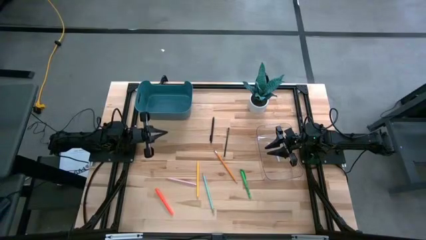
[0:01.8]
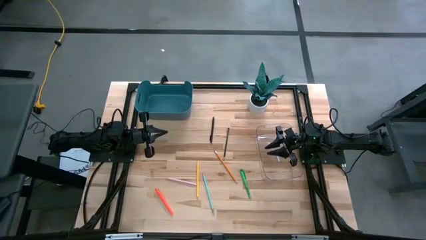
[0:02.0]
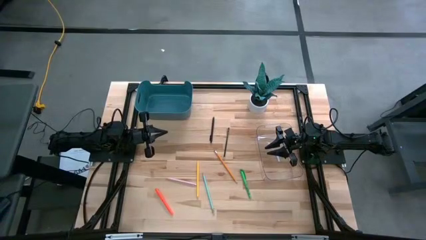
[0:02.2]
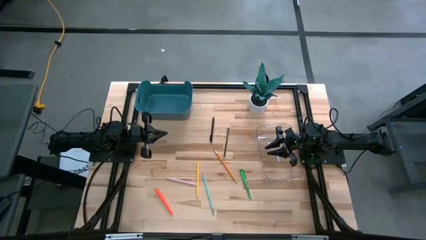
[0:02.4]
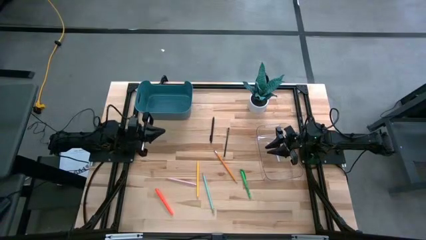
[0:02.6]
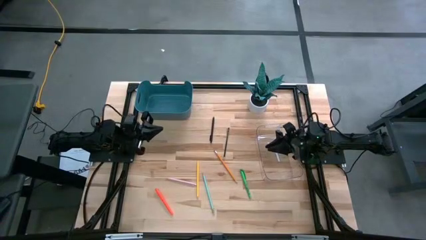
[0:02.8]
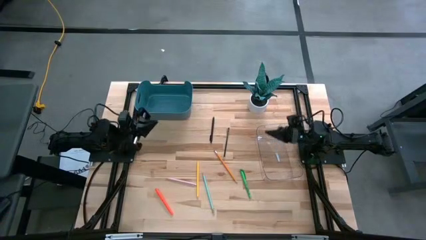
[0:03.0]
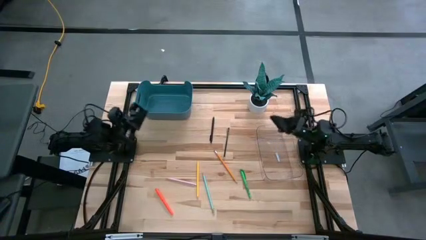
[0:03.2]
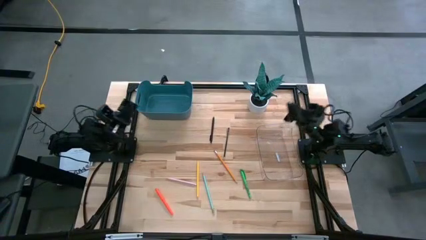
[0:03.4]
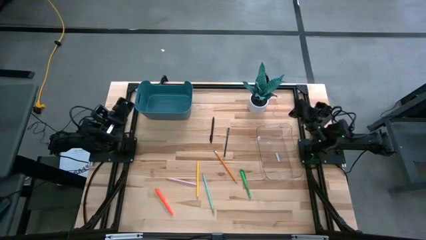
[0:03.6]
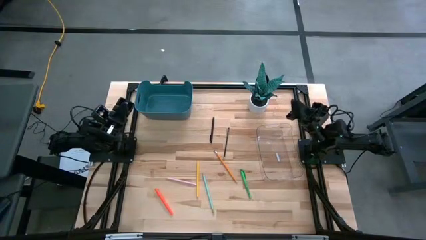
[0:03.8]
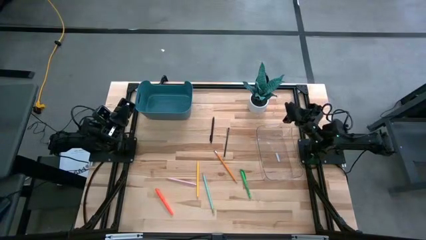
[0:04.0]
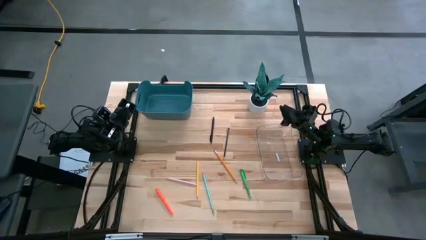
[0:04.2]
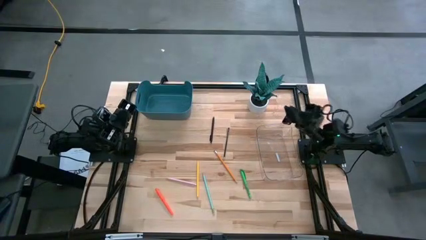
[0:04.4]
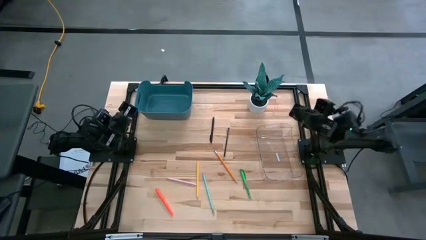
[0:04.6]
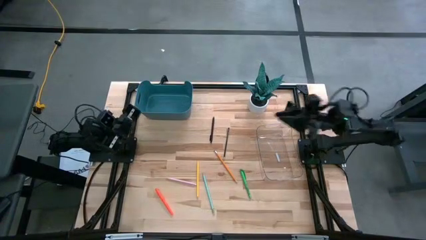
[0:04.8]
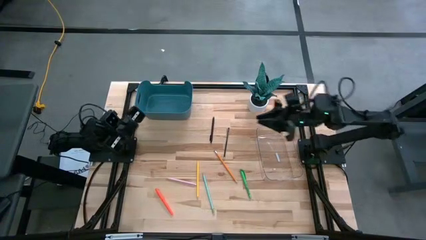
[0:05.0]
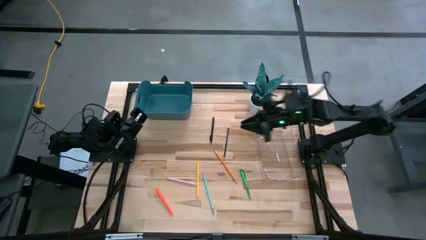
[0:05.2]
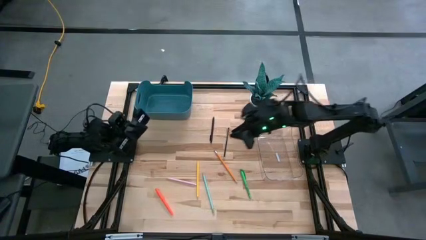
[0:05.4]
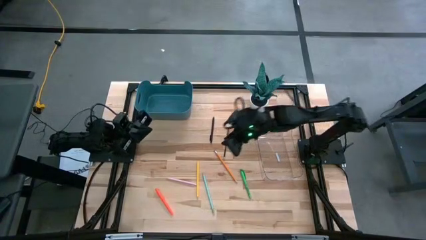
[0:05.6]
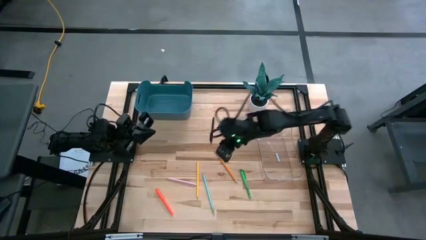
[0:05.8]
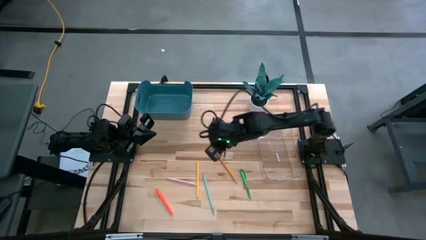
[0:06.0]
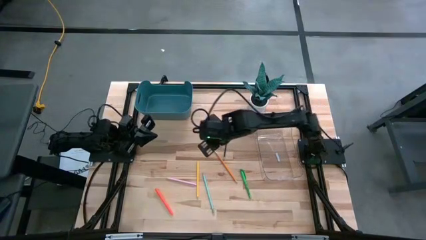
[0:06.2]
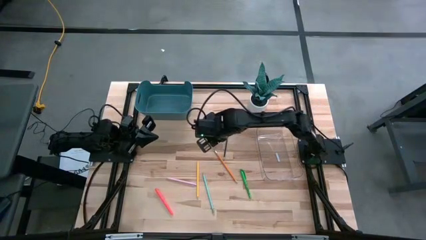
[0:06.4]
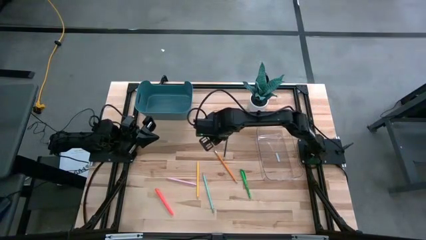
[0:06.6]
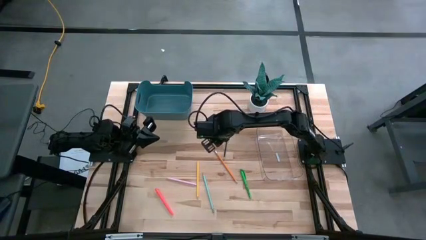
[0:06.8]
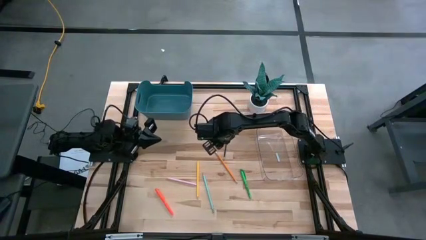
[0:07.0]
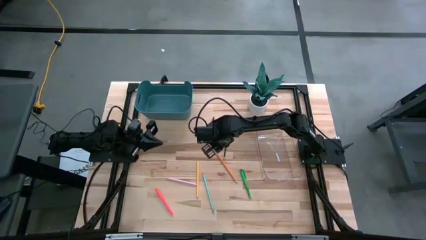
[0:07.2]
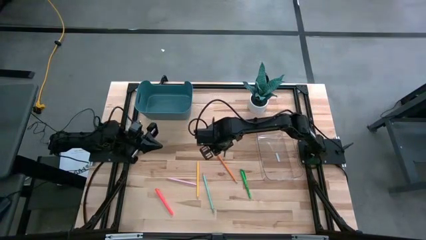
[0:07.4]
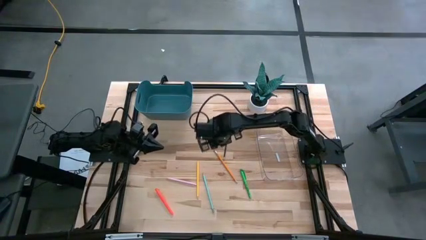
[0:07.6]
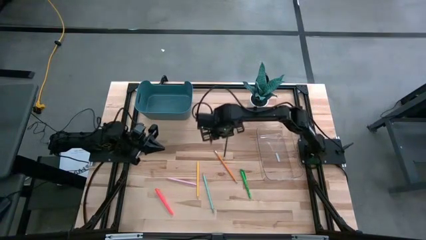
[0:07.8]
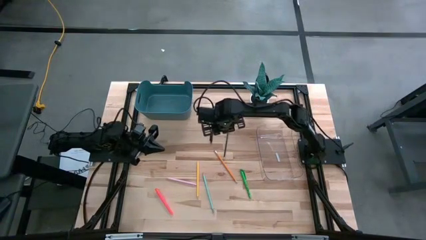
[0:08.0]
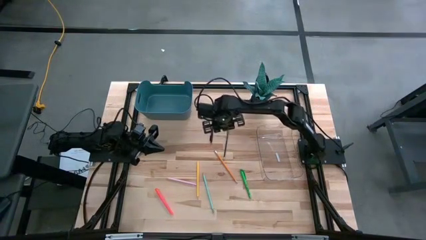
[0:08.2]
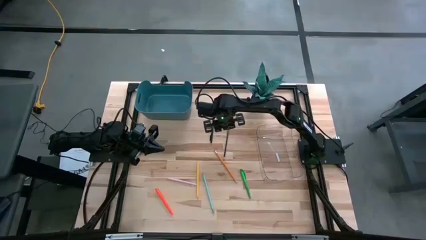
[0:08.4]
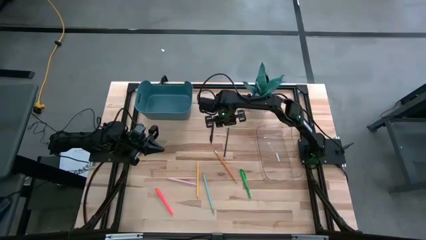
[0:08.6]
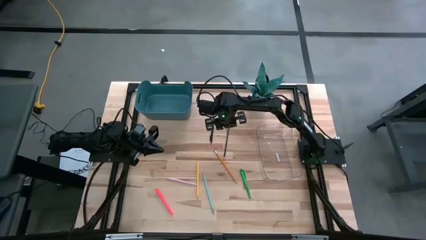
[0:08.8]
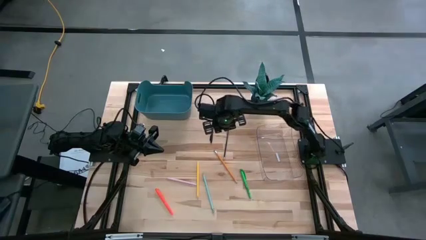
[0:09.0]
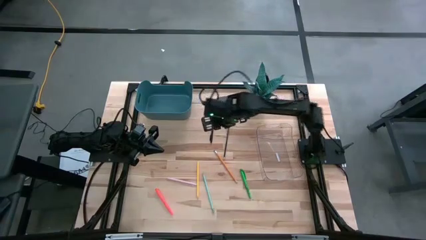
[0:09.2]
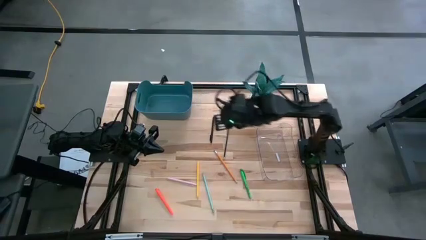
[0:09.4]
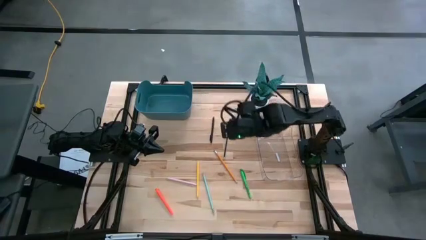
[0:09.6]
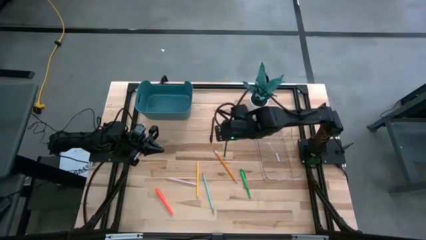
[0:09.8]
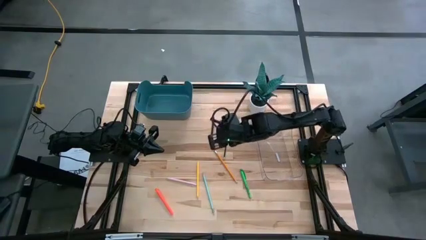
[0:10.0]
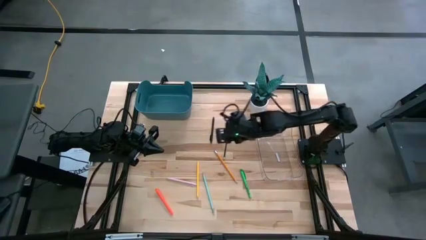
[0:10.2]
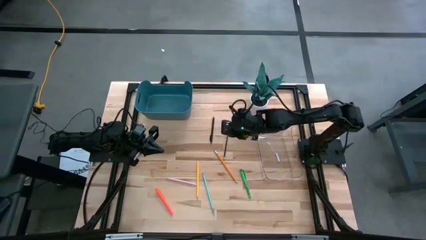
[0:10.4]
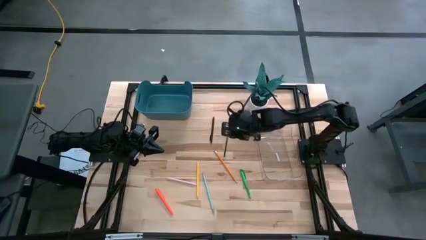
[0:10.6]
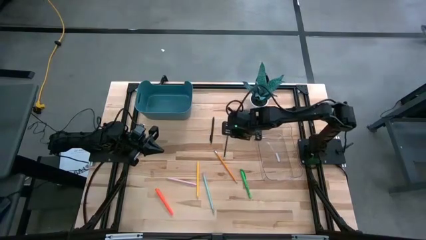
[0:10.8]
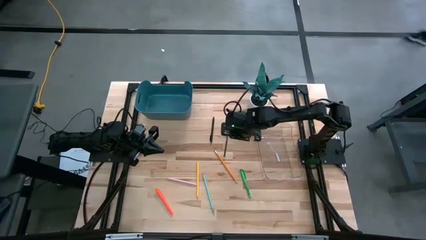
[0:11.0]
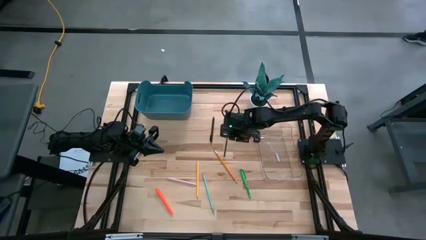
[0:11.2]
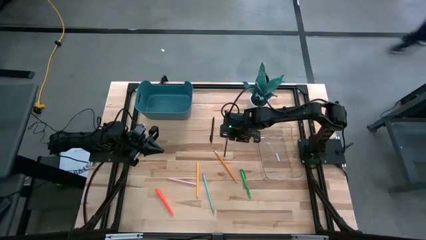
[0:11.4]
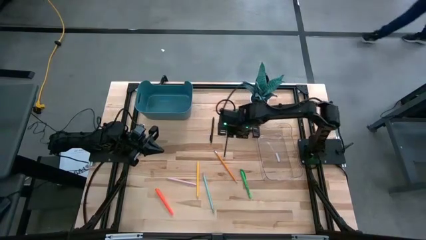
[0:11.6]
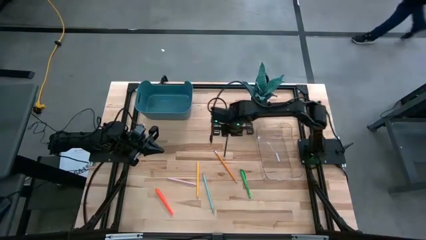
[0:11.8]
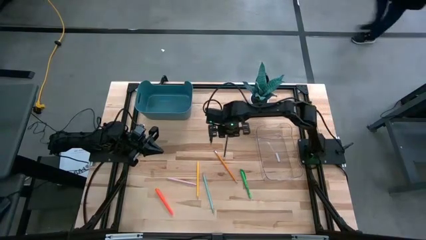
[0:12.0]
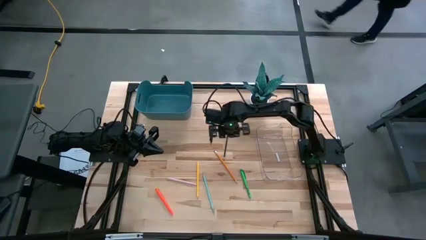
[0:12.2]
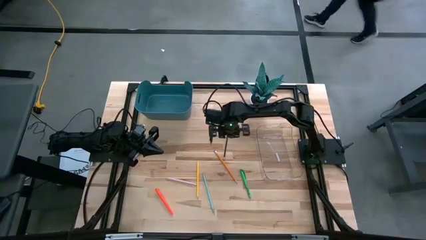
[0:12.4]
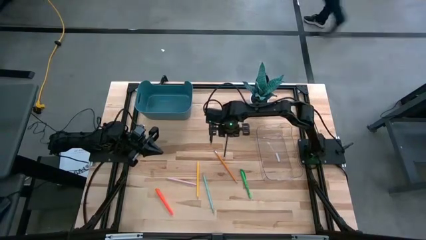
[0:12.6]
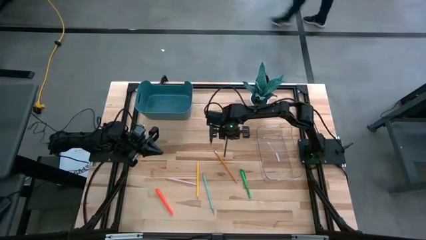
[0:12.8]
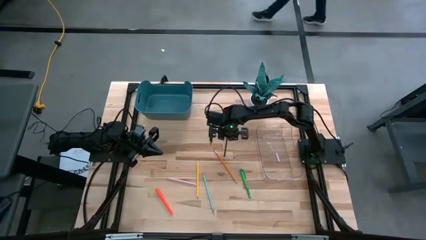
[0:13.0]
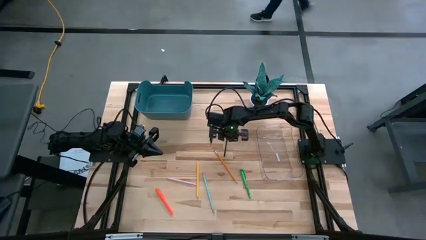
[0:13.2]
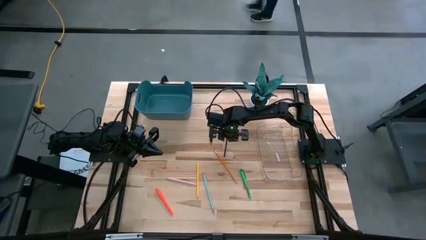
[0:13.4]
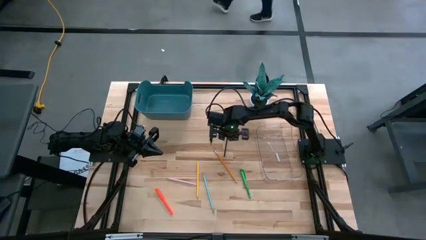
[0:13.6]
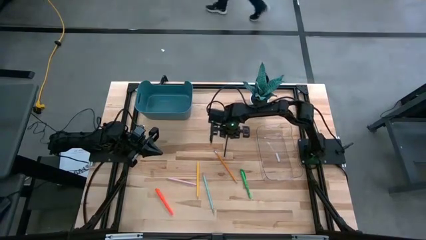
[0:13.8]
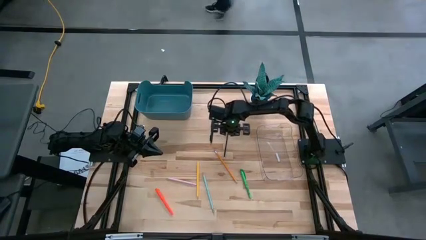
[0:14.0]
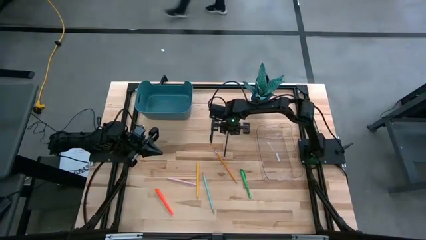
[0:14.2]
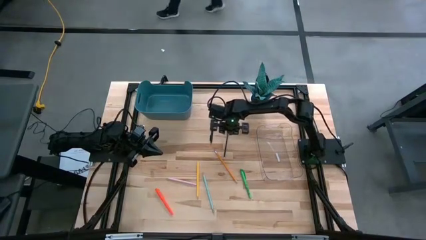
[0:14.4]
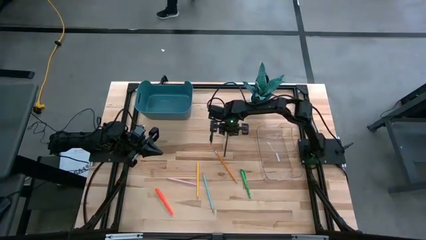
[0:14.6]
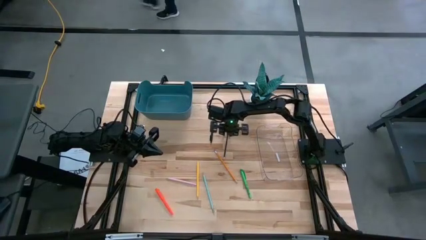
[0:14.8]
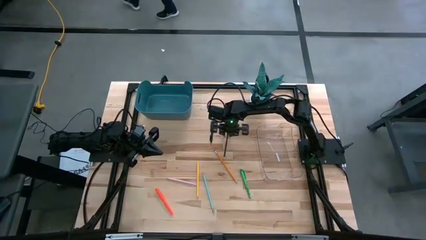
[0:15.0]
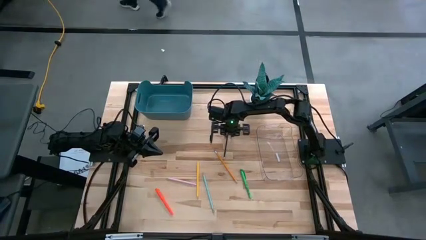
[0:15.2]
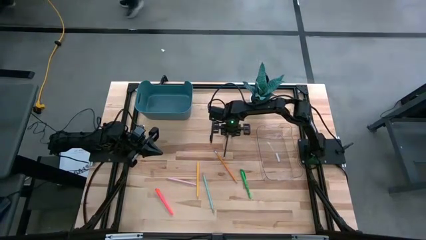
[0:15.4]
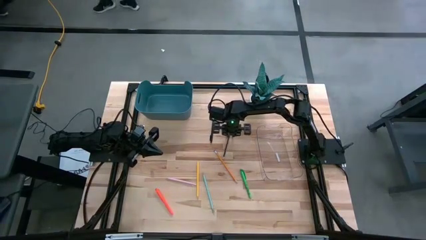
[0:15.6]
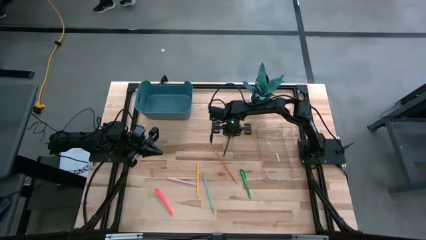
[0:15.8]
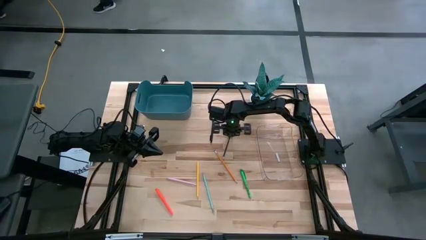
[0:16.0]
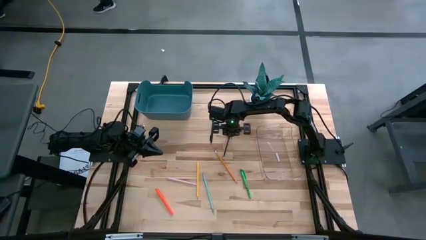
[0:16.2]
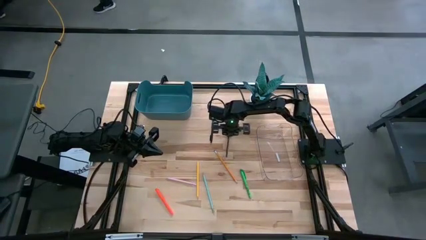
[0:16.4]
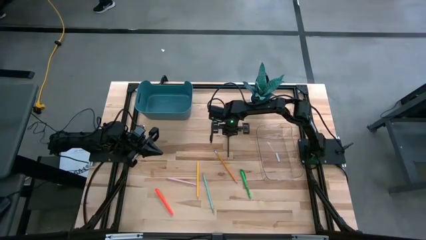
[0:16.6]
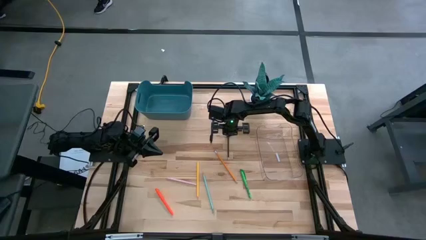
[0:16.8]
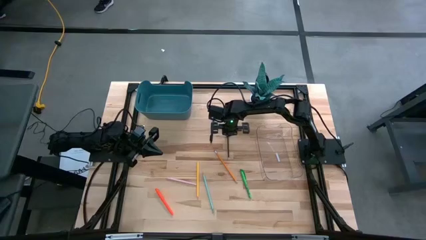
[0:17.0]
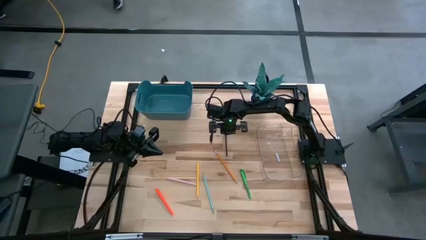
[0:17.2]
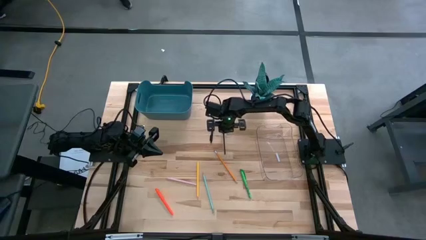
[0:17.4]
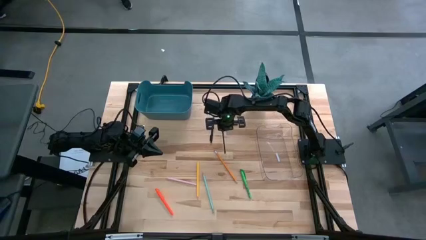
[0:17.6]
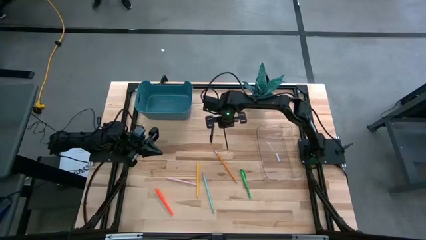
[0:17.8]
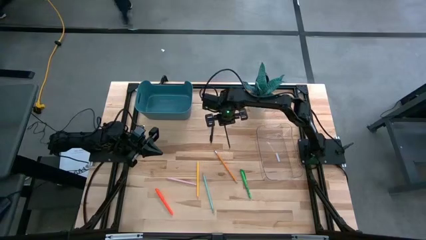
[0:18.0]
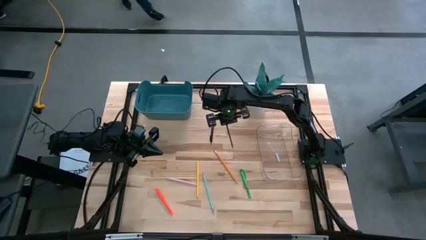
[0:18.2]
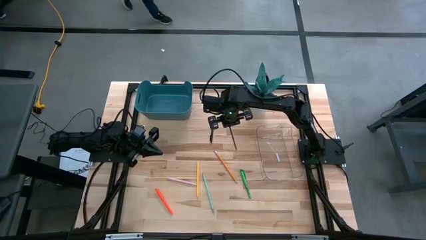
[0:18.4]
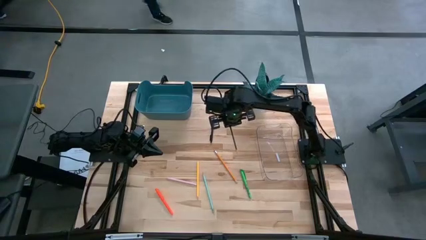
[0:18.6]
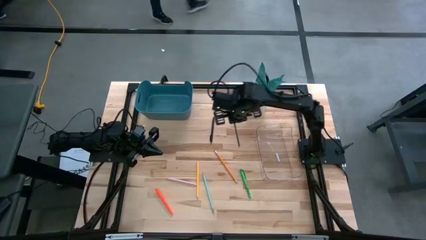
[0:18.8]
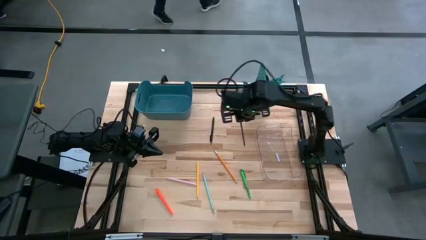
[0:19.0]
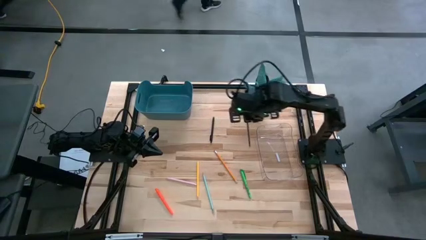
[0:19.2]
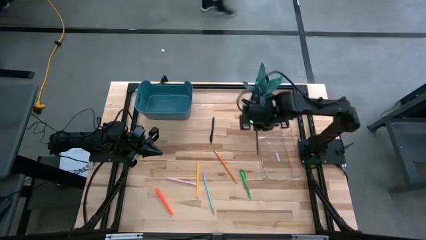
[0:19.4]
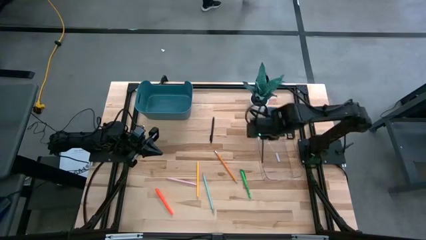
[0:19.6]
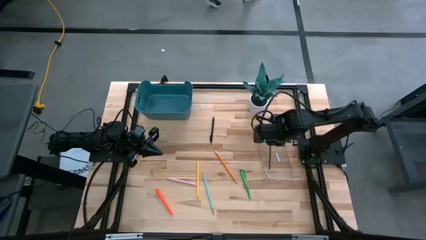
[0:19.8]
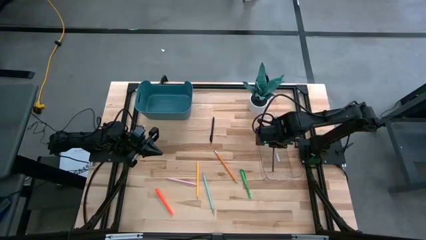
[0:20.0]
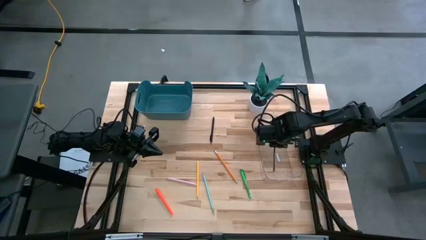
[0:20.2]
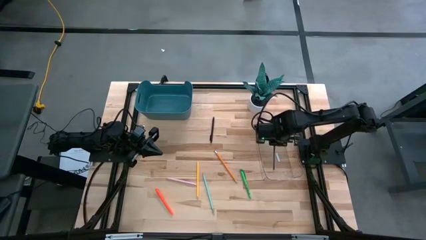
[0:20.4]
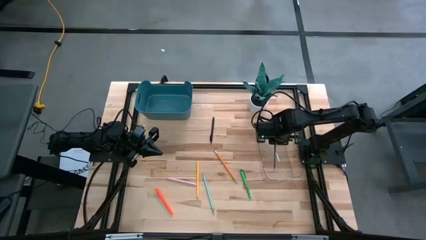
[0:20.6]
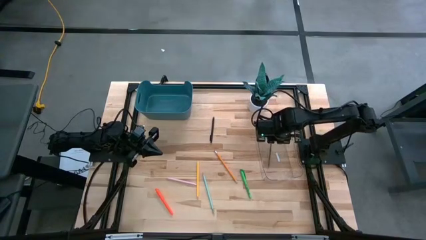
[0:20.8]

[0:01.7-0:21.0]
Task: Sort pens & pencils
Put the blue pencil into the transparent bin
